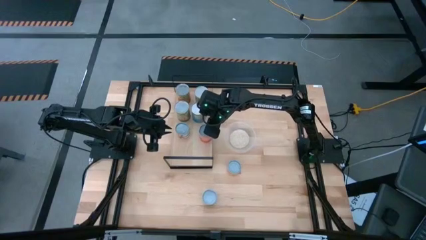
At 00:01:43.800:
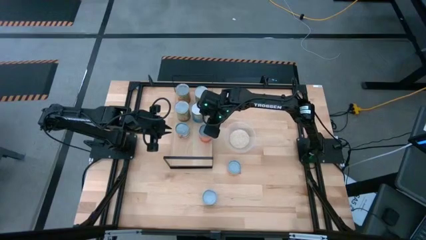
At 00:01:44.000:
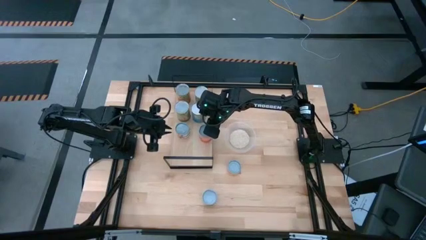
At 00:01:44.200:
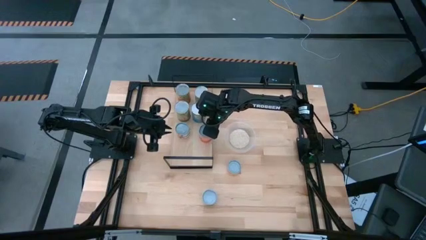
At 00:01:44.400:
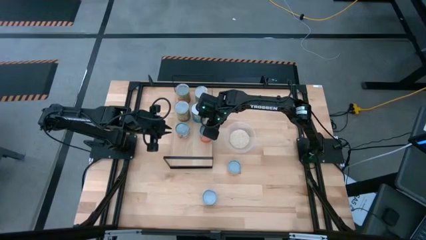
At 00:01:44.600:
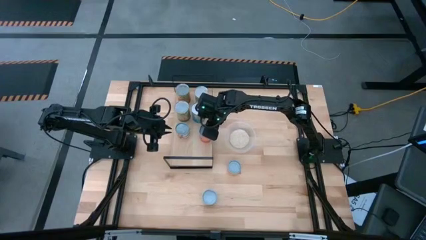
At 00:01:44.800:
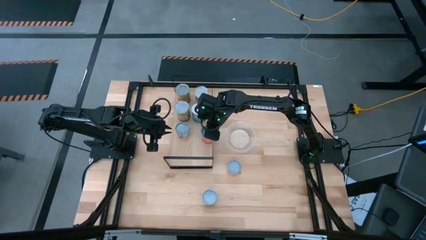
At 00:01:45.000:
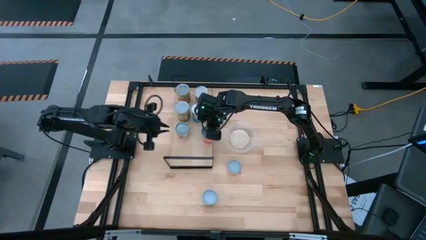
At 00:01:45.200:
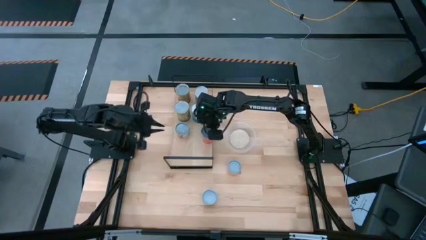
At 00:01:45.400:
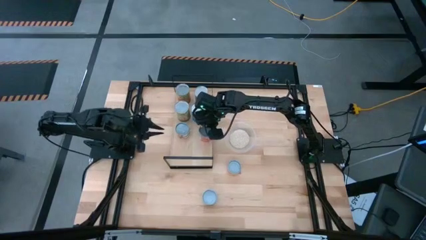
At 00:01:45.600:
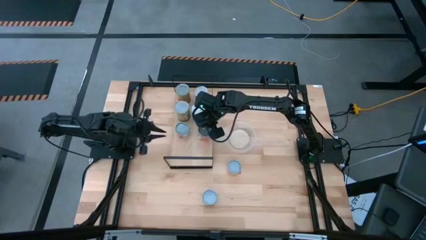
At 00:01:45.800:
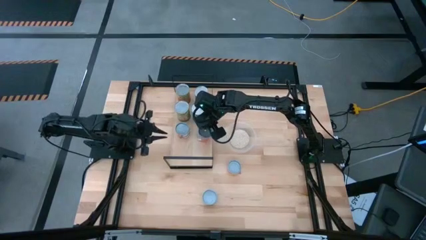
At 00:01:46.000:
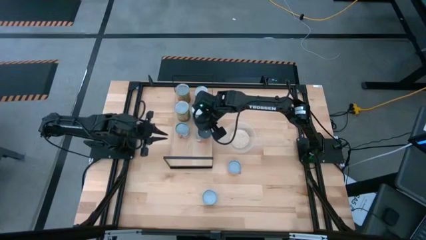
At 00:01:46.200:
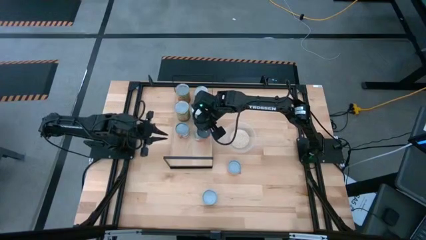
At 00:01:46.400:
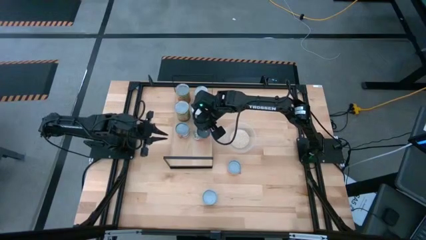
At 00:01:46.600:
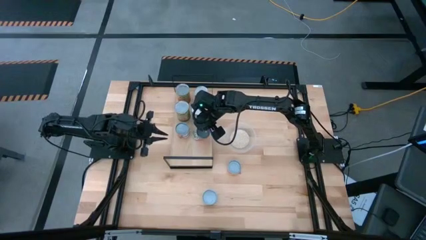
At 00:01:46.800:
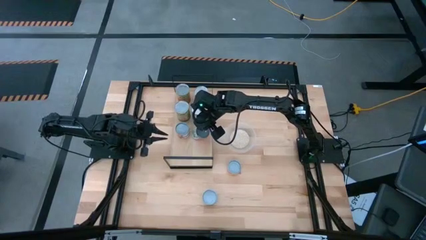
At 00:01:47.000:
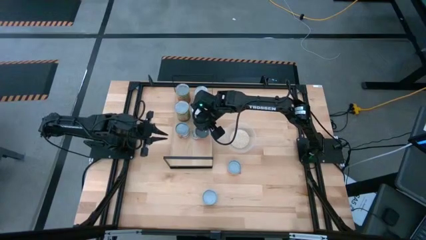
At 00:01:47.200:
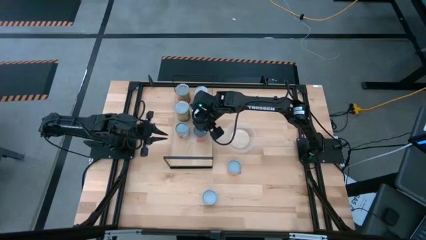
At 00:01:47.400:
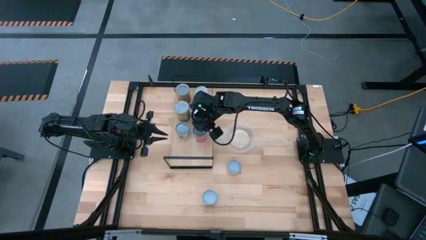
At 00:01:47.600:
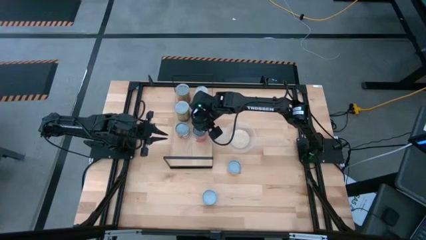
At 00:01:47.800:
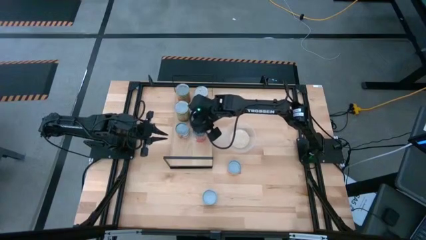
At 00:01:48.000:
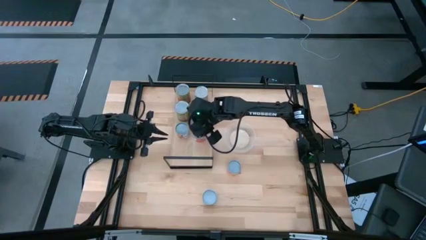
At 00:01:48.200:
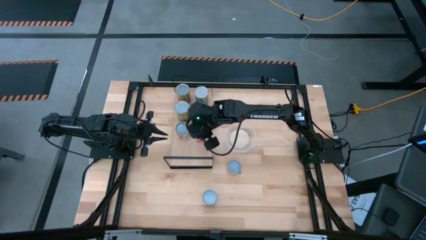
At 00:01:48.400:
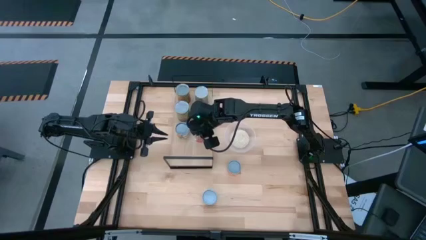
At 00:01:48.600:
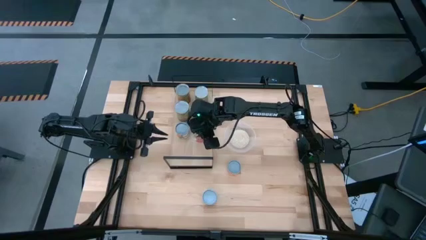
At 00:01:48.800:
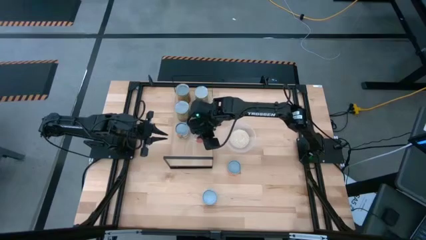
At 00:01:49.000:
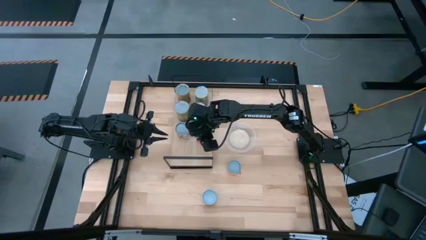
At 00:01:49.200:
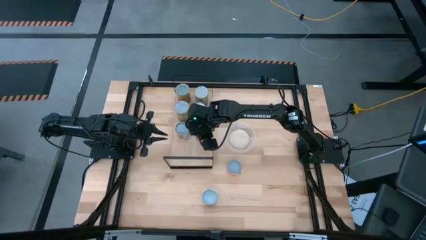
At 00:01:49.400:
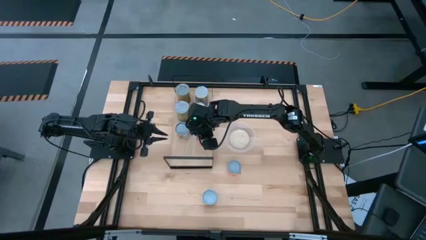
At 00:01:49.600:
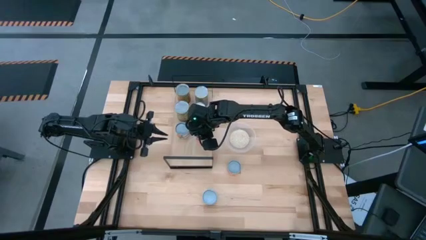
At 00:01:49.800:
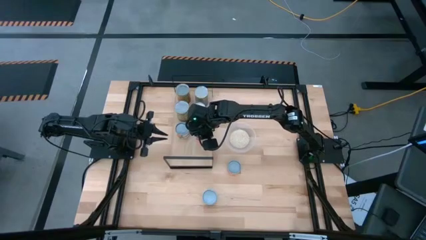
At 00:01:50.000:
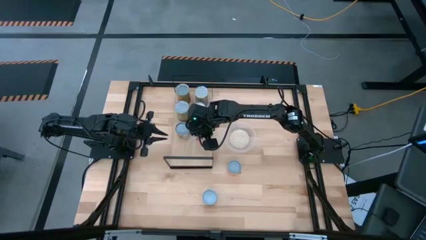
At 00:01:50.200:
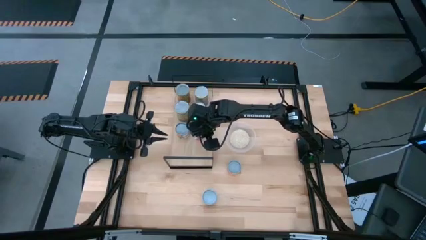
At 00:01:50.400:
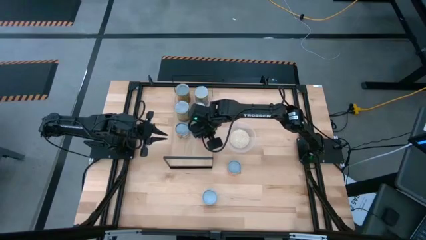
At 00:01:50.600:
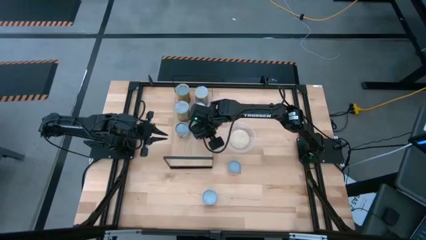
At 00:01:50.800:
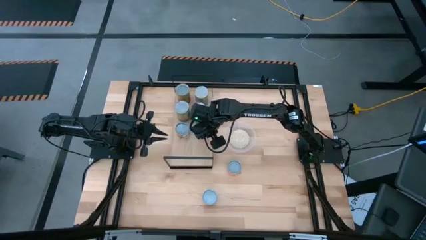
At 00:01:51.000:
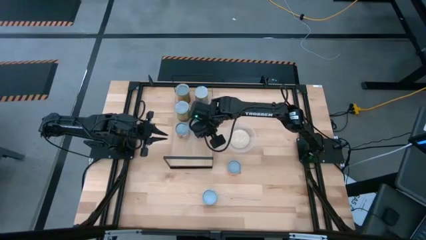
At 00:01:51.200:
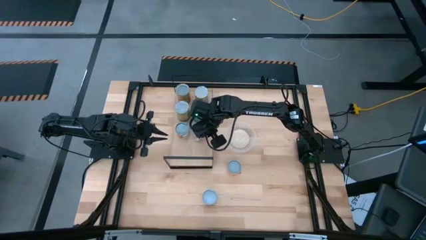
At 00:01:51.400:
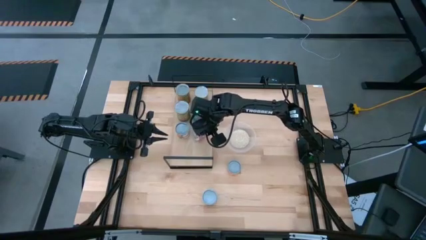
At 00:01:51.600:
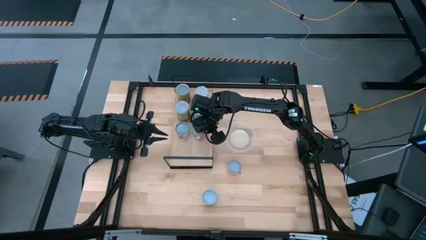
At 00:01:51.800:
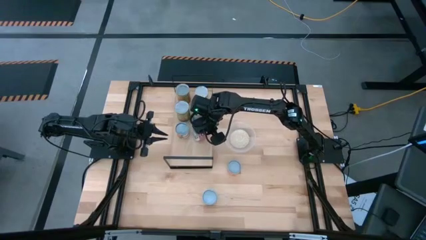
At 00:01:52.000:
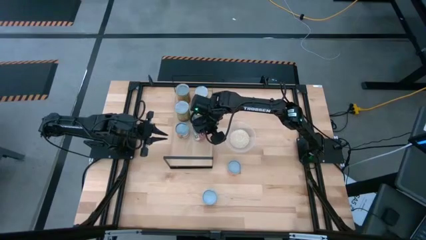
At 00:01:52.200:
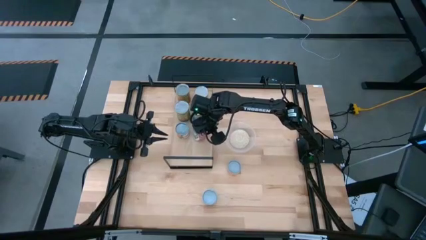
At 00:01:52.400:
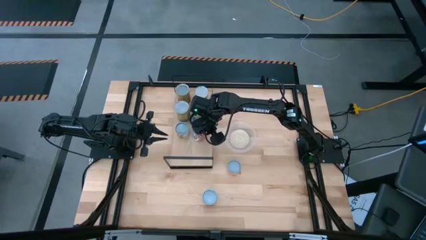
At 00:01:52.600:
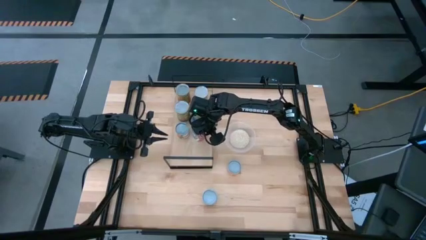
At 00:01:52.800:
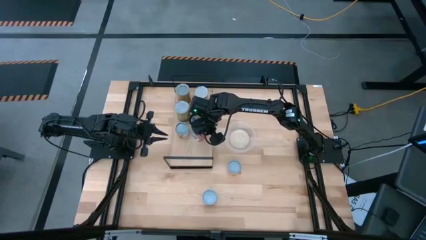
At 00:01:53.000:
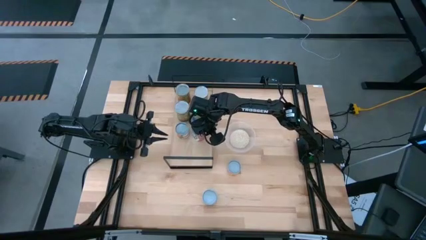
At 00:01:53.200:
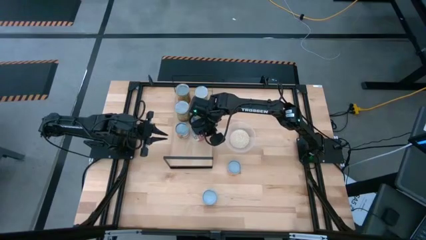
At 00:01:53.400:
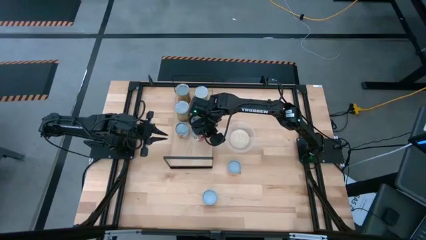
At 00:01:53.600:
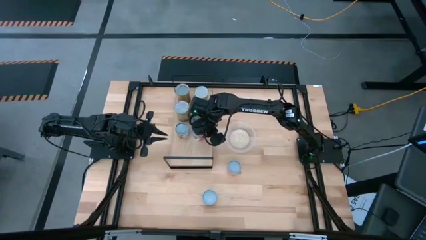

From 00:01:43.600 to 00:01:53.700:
Task: Pick and place cans onto a shelf
Put the small canned mixed fruit can on the shelf
